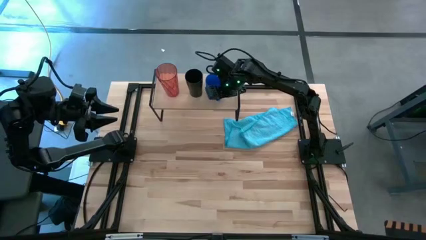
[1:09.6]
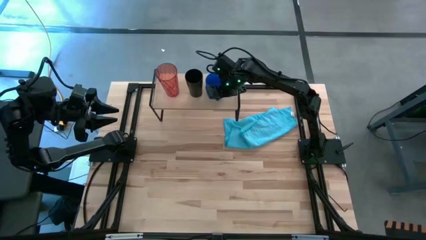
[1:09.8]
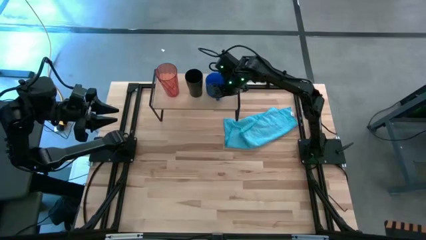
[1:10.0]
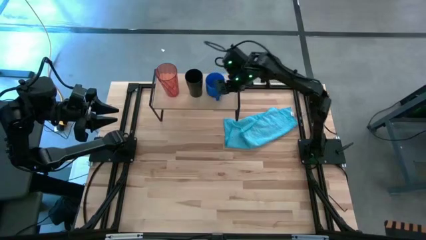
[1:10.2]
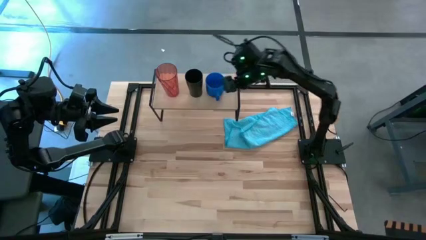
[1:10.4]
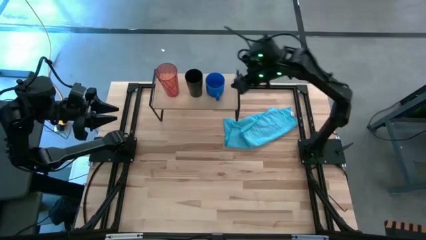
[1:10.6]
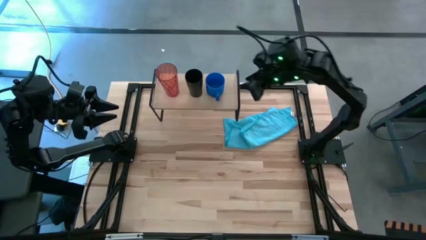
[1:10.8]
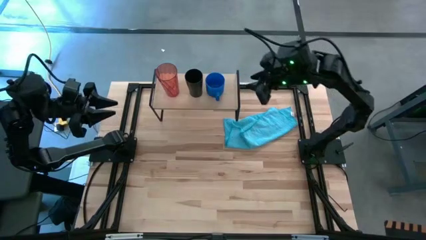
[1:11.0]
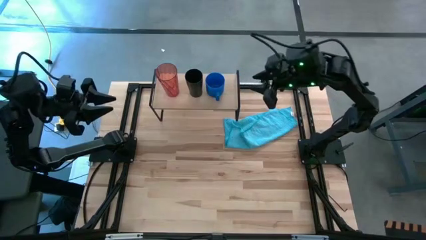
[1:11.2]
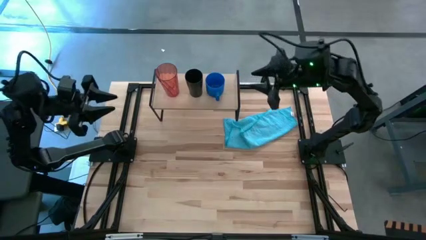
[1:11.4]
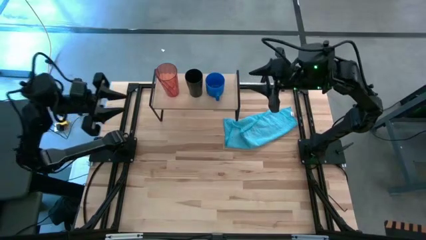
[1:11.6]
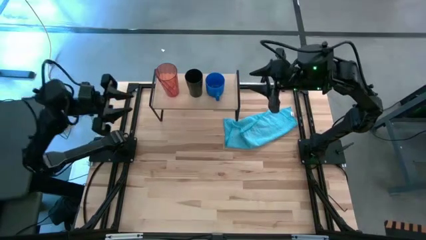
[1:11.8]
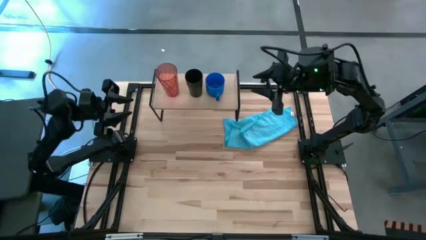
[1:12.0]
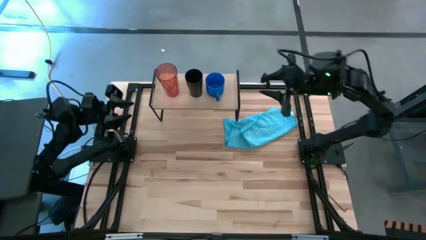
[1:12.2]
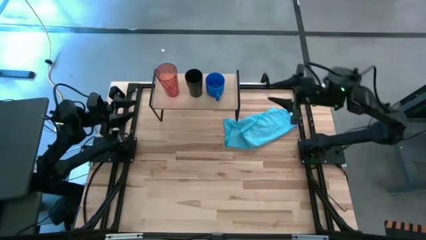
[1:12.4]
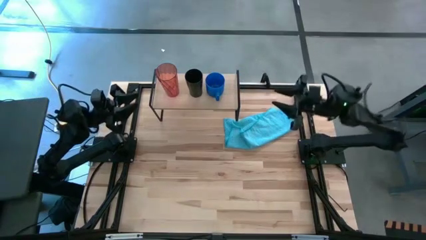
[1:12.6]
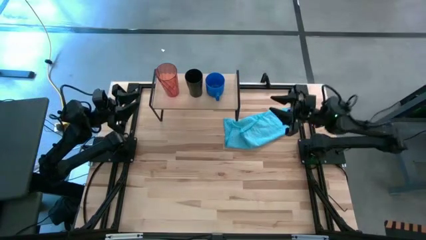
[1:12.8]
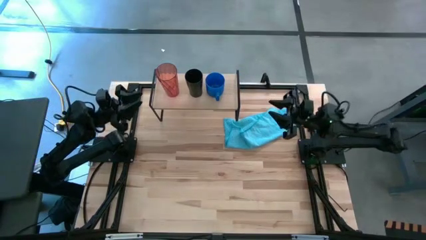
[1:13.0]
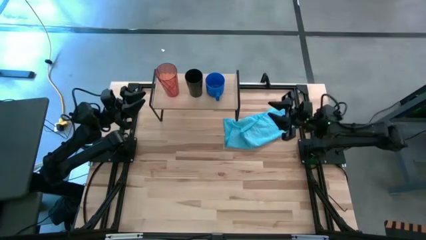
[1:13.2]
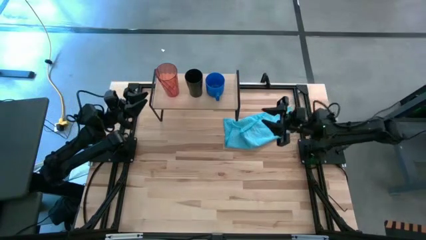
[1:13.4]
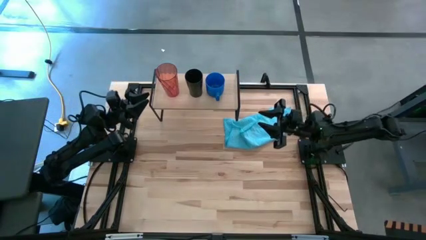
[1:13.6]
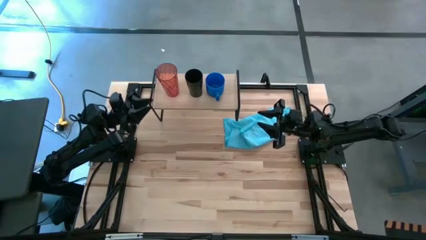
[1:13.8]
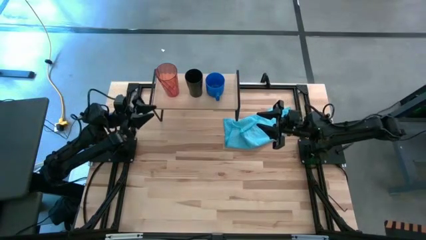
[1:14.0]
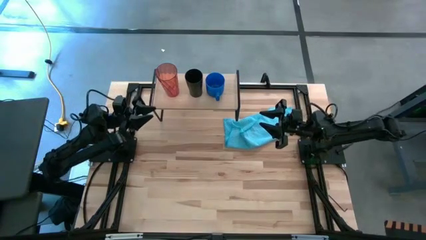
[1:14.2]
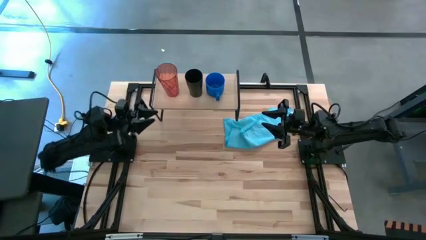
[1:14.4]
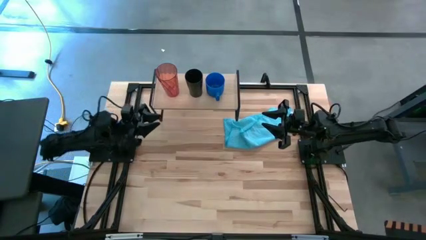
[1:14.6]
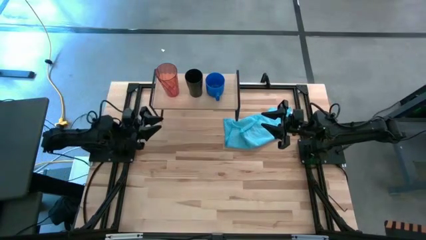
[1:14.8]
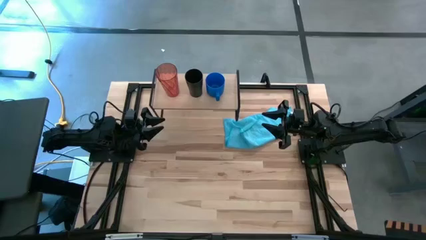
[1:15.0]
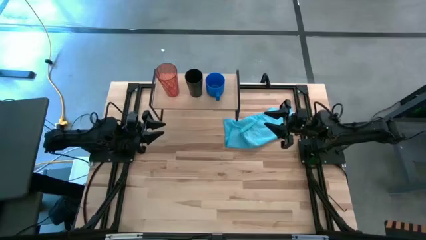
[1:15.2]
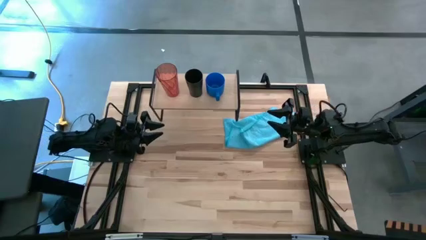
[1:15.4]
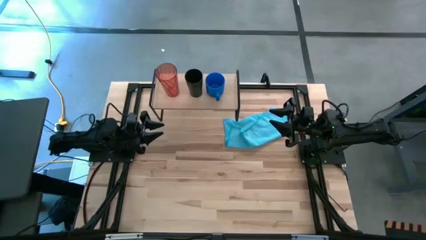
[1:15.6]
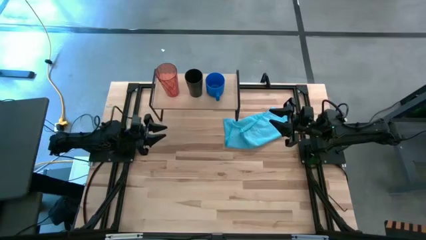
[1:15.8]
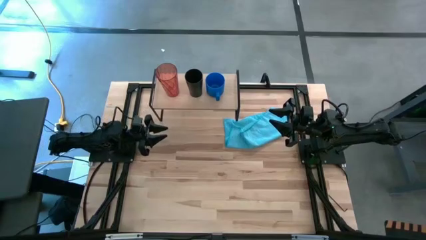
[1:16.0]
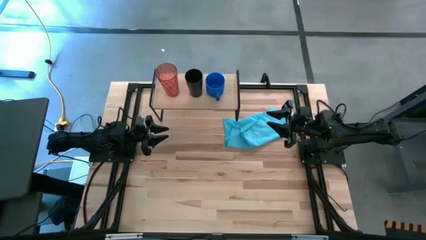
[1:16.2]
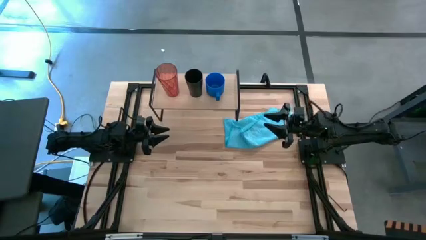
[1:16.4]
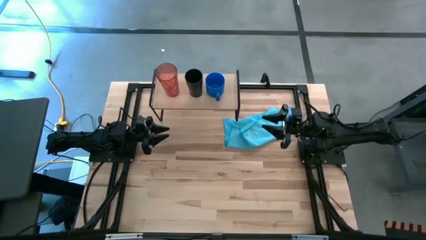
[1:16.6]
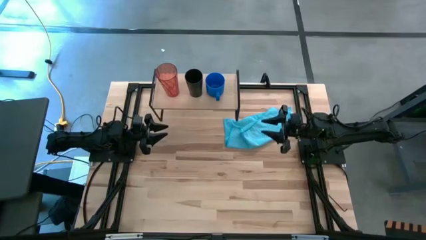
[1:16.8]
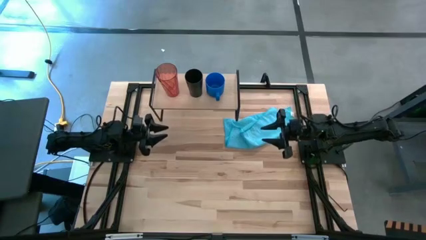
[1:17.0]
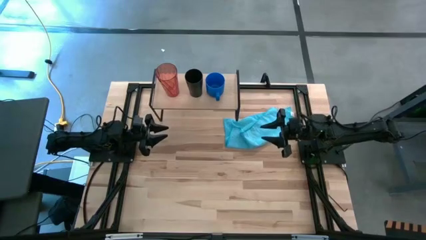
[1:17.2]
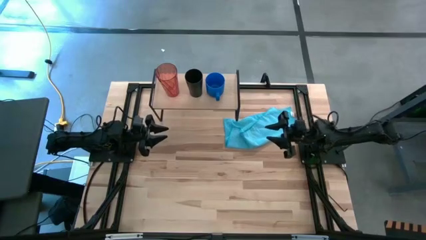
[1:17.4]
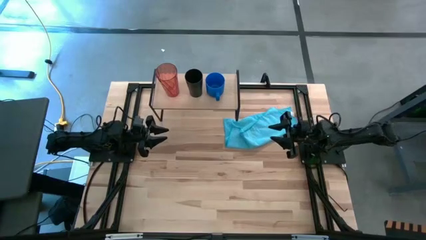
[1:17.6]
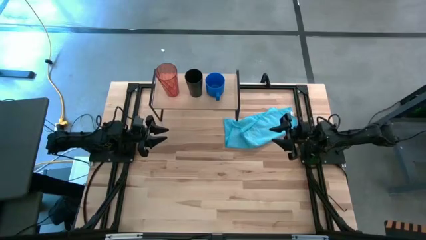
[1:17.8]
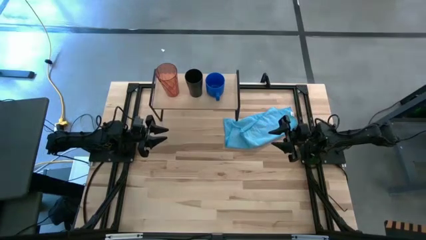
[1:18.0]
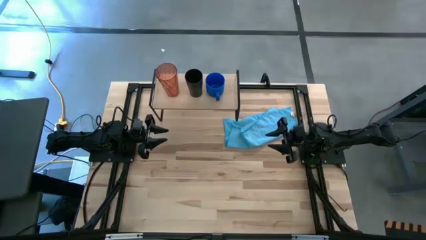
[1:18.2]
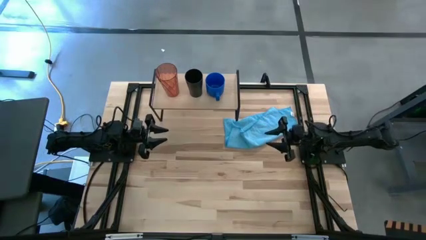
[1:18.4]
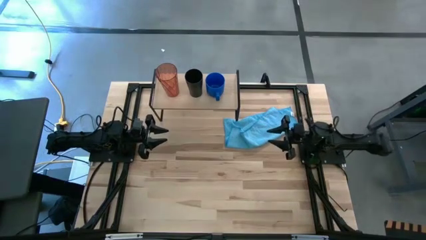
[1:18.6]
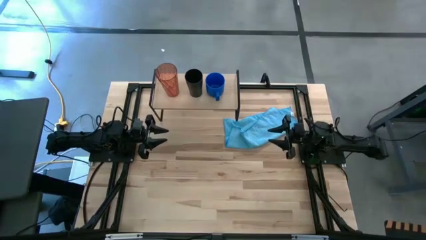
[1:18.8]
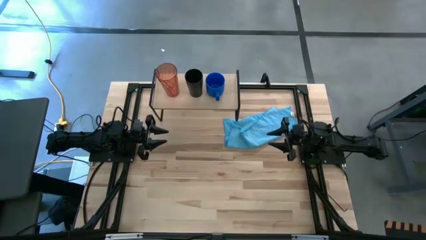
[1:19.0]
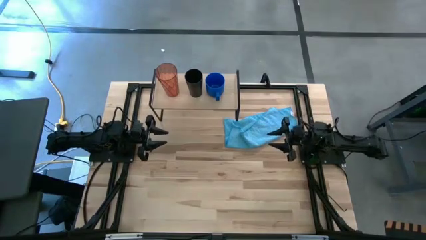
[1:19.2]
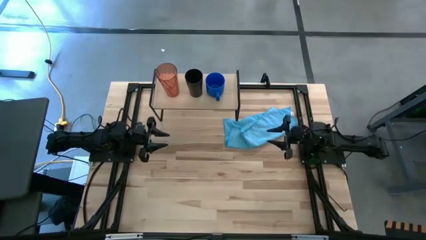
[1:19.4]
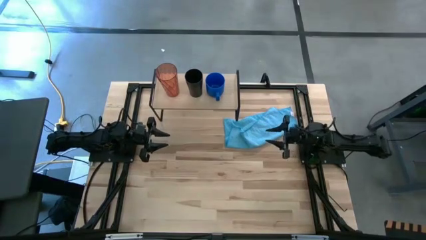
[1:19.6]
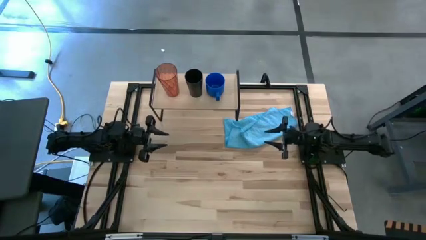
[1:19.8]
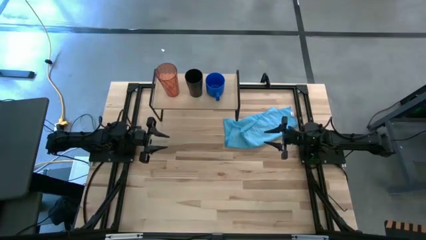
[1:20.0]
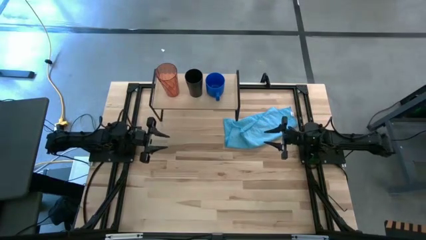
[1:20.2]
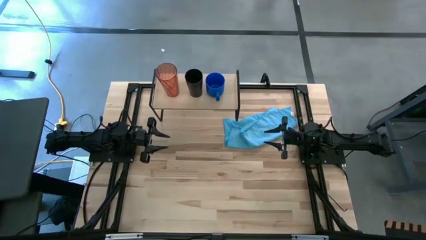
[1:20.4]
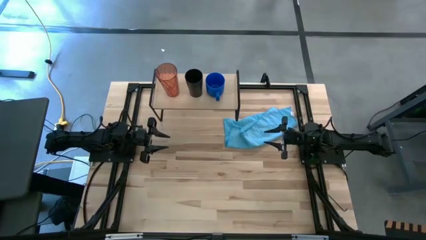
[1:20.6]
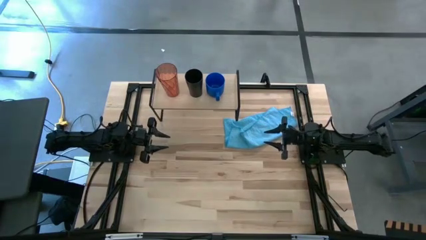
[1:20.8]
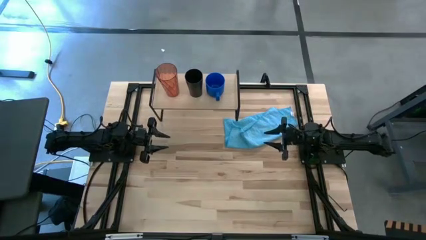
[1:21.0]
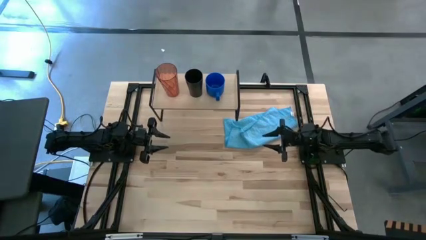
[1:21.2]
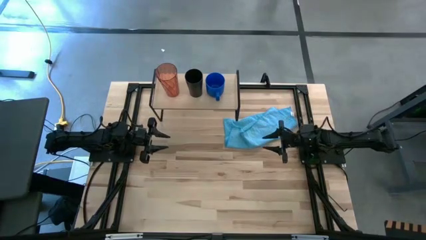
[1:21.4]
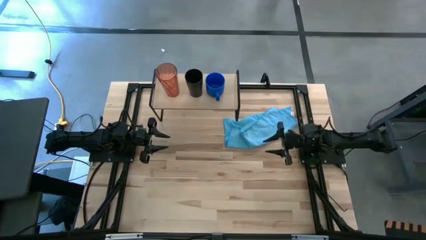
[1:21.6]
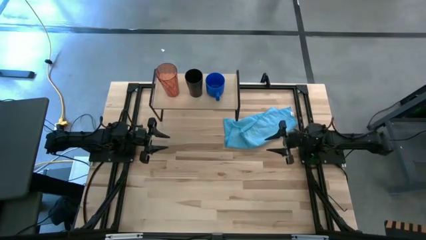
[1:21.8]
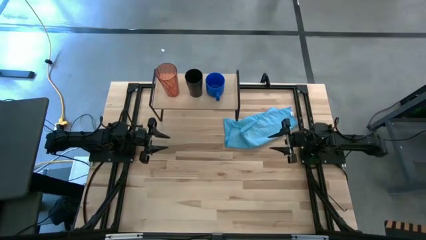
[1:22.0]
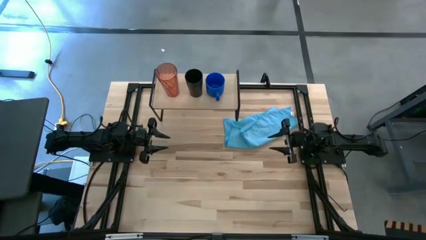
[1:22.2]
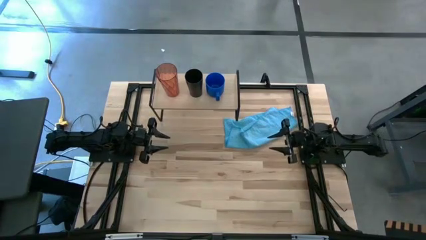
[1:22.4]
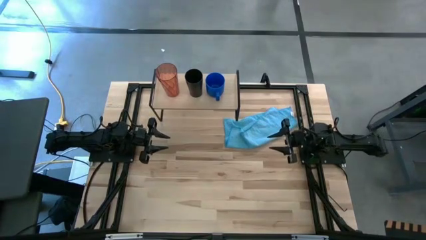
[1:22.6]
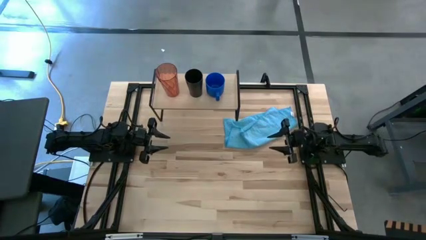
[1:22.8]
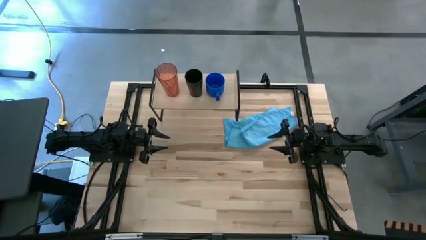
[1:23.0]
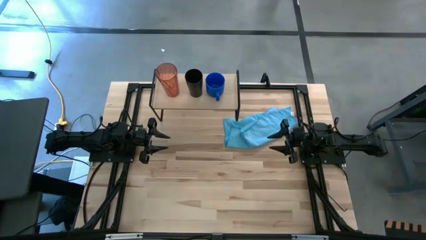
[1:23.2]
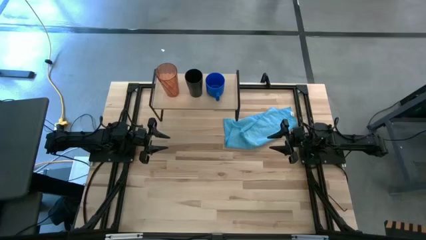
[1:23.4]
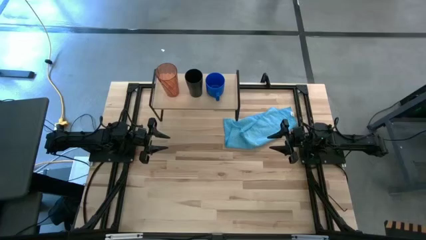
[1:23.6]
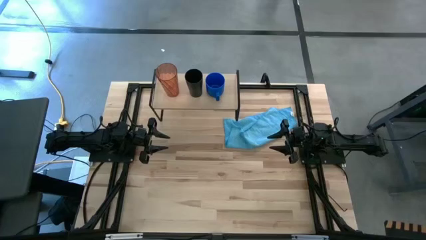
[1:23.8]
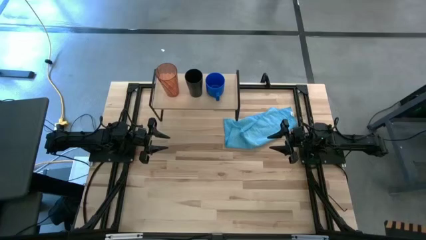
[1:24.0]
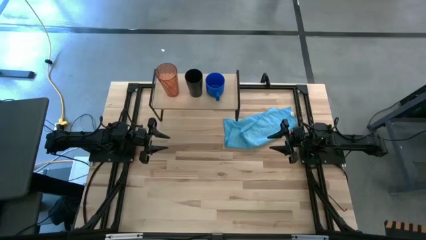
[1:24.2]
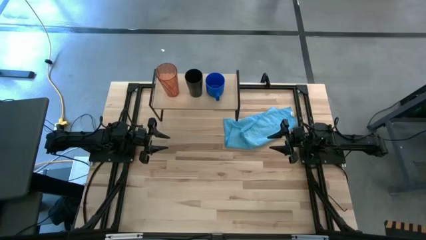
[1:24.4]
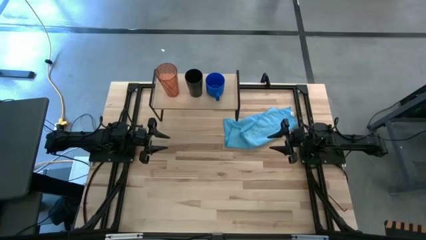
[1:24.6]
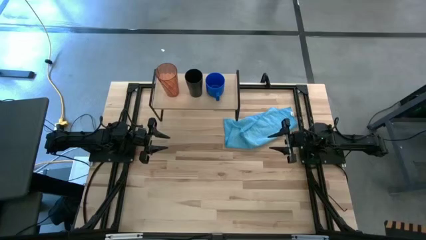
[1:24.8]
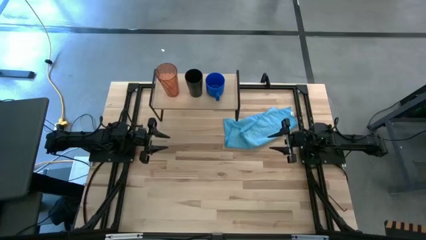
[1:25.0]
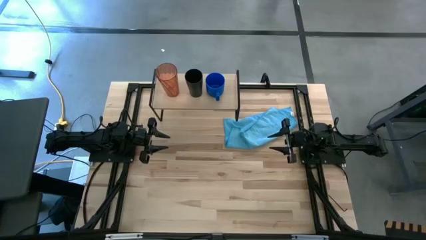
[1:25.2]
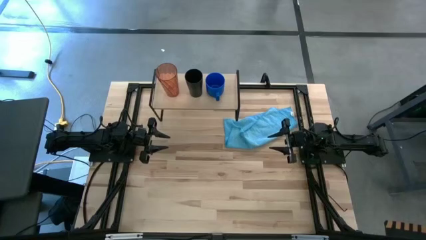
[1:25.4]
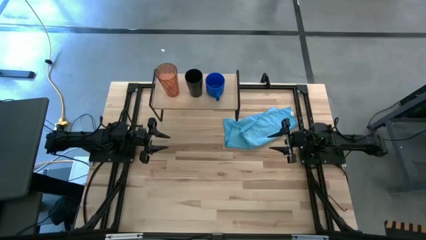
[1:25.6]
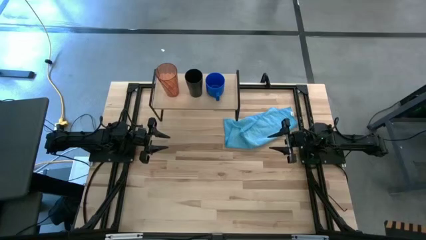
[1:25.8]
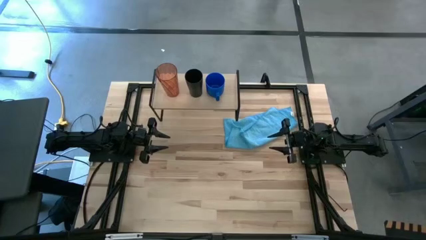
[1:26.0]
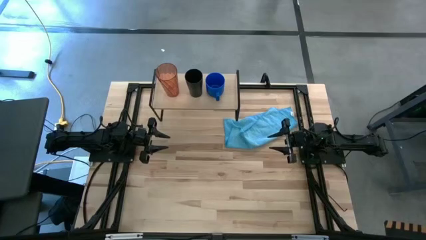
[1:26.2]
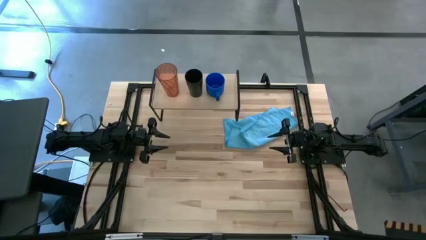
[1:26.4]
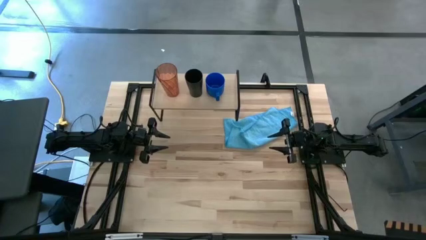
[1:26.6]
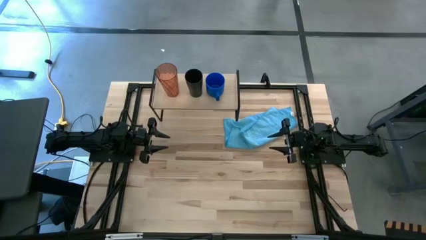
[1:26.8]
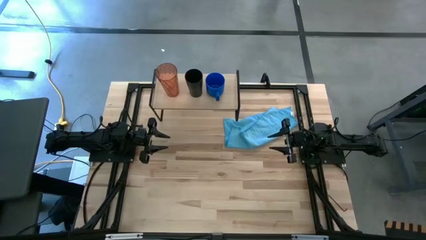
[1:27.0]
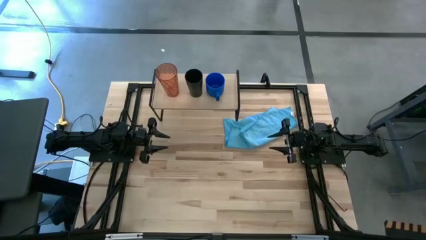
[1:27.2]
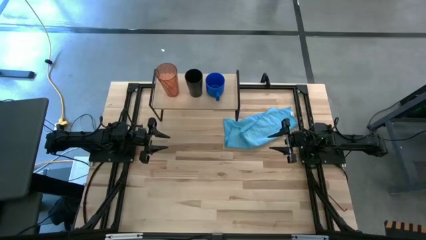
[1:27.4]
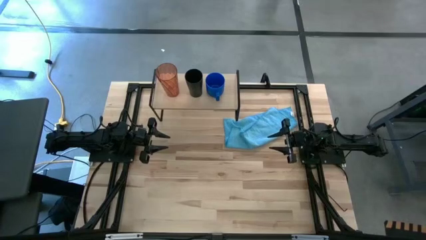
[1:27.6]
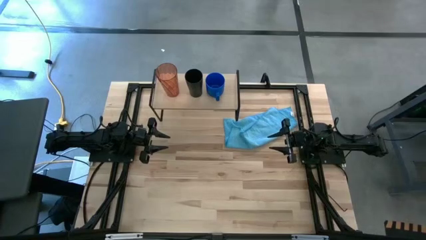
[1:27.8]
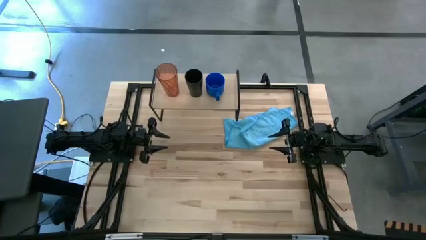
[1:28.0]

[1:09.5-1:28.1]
Task: Stack small to large cups/mugs on shelf
Return to Home Position
